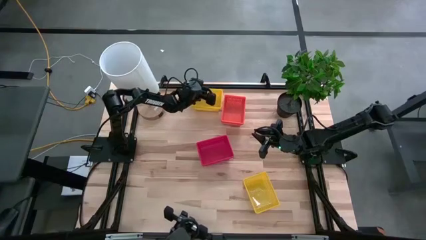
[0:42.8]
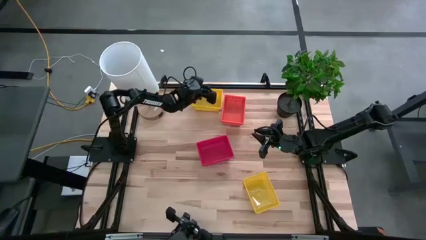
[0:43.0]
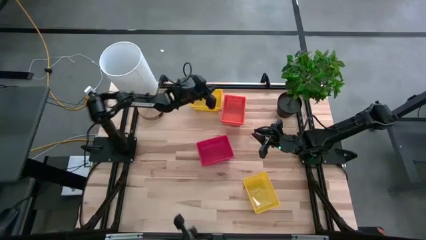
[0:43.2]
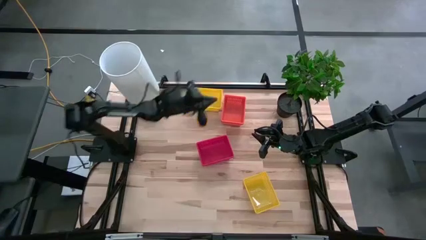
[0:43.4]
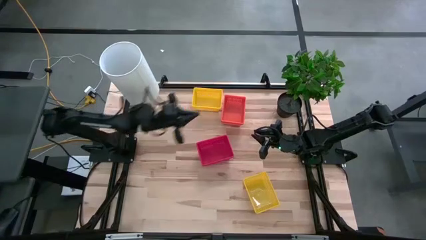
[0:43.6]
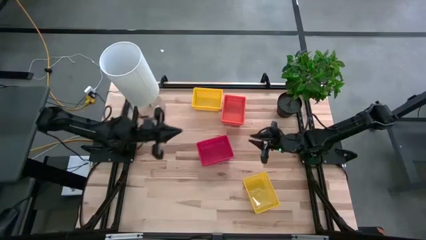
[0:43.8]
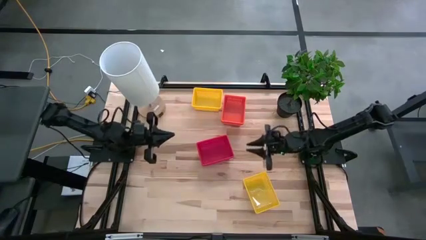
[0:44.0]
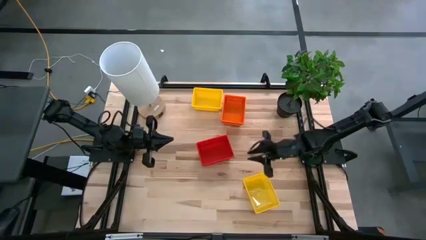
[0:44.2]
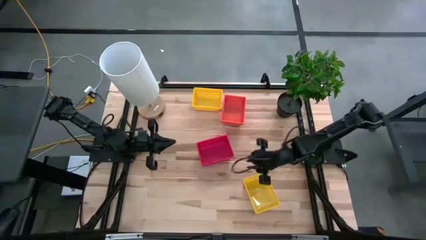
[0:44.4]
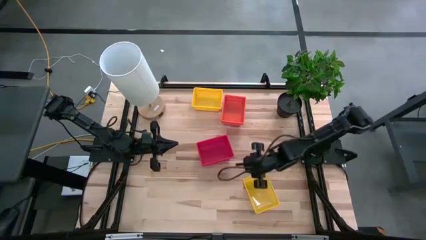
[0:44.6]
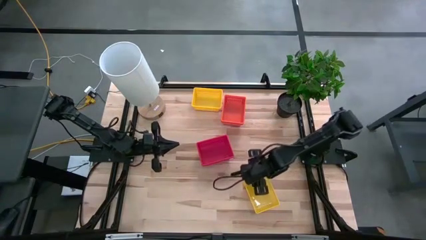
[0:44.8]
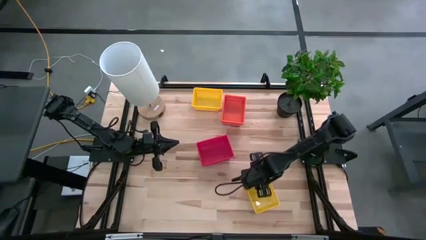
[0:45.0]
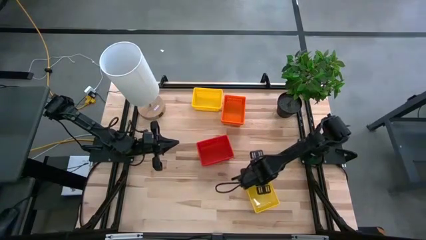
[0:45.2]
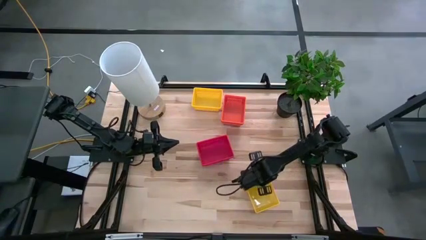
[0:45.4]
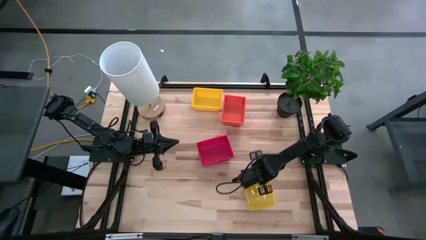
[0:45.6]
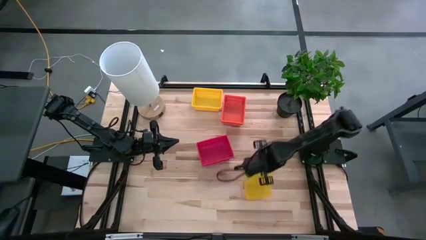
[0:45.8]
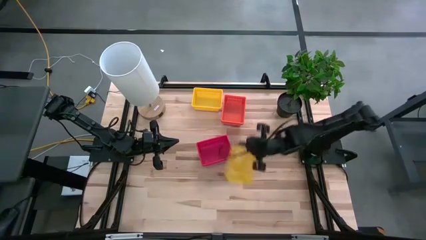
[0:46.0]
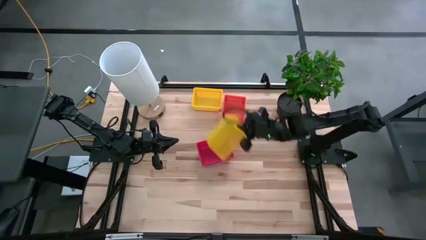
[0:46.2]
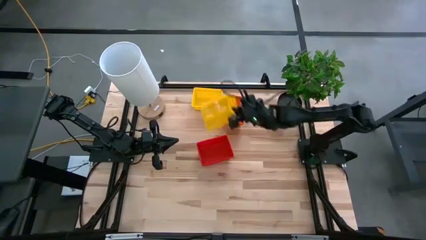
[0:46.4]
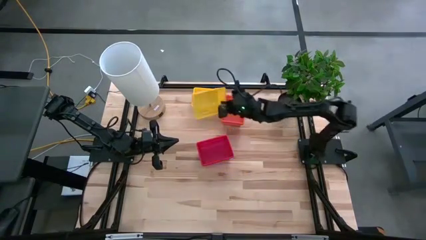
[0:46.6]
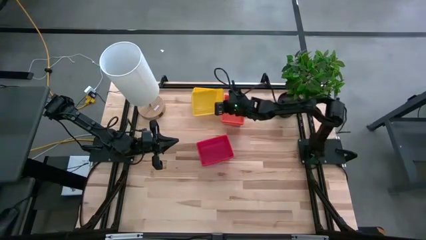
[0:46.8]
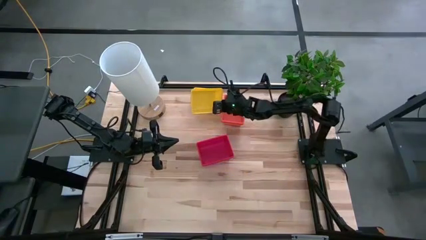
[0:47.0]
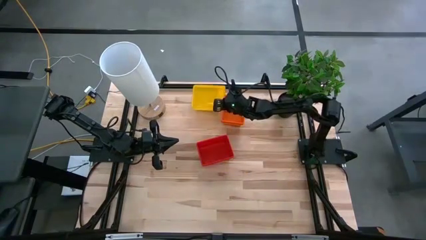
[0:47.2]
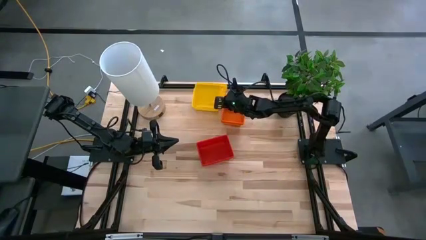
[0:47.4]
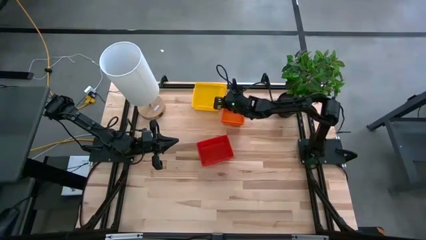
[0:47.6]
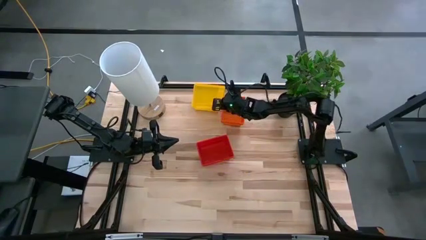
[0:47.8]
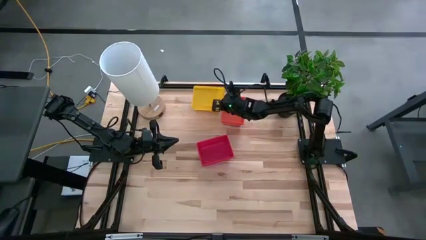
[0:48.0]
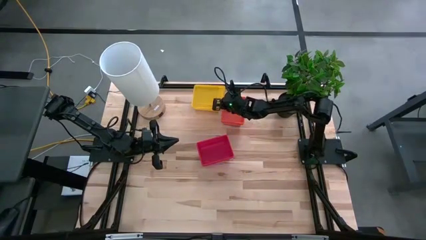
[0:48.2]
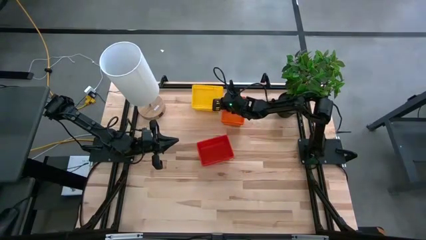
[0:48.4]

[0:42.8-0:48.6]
Stack the right yellow bin on the top yellow bin

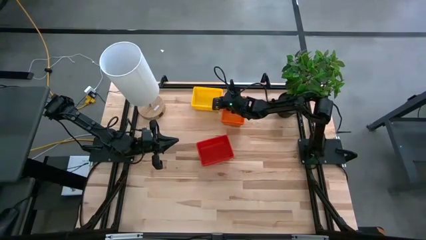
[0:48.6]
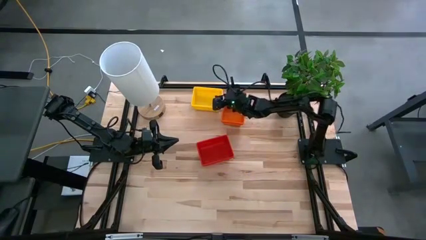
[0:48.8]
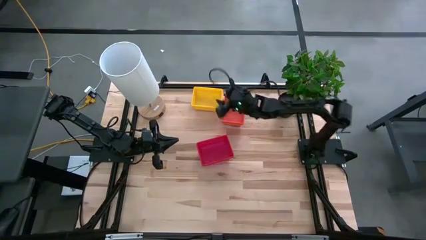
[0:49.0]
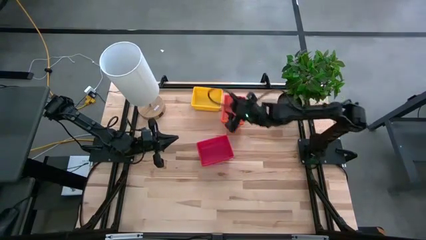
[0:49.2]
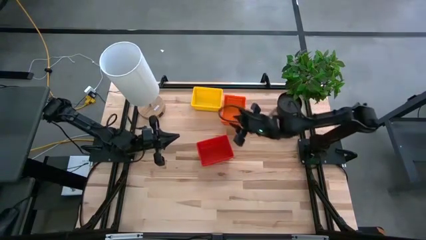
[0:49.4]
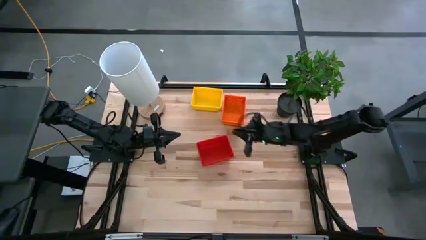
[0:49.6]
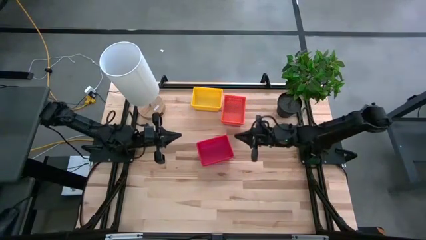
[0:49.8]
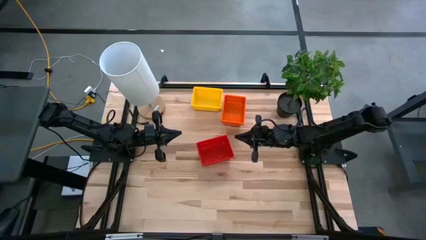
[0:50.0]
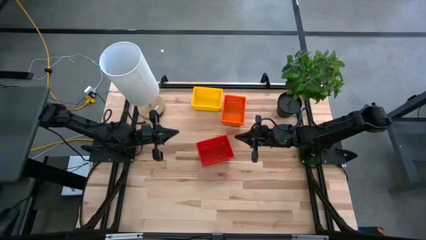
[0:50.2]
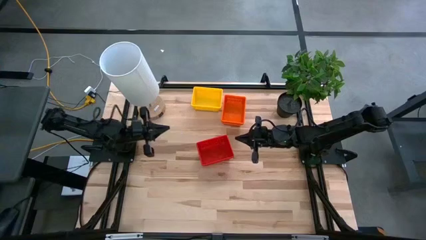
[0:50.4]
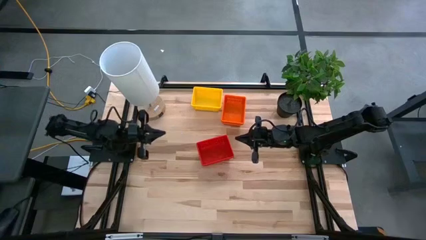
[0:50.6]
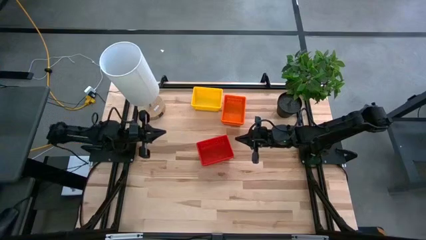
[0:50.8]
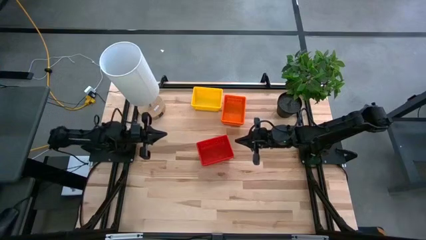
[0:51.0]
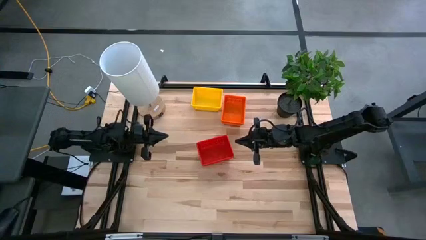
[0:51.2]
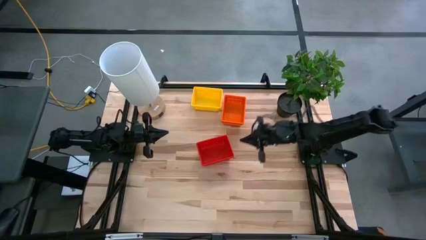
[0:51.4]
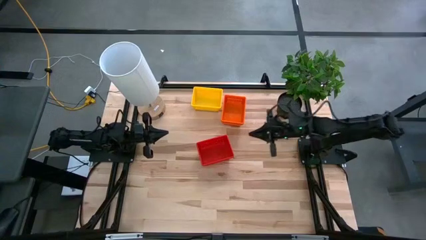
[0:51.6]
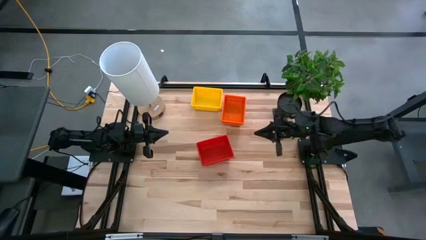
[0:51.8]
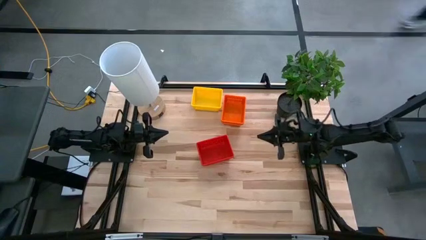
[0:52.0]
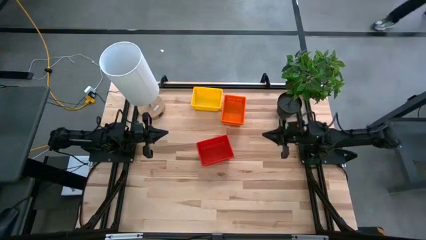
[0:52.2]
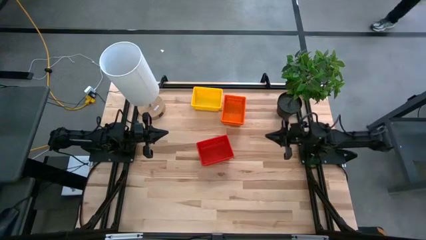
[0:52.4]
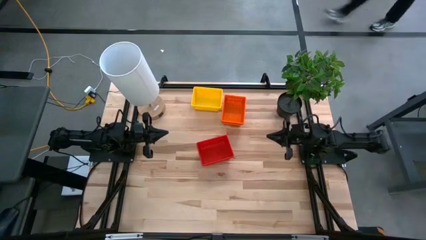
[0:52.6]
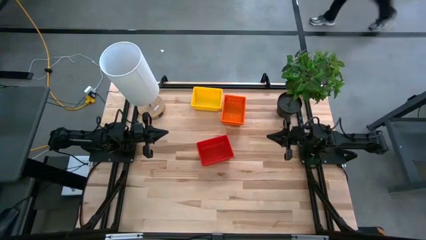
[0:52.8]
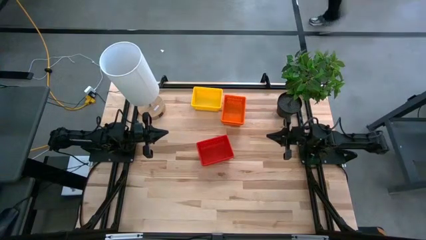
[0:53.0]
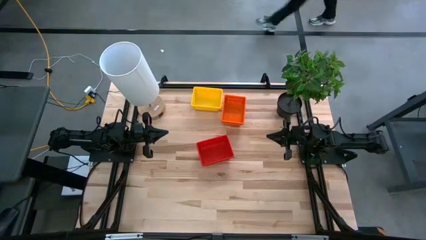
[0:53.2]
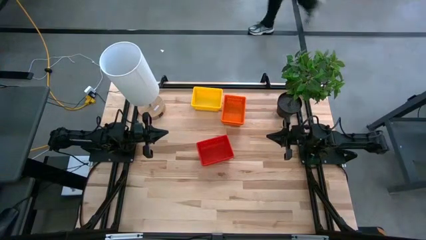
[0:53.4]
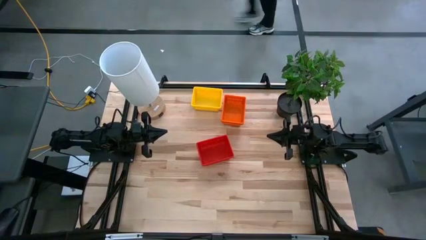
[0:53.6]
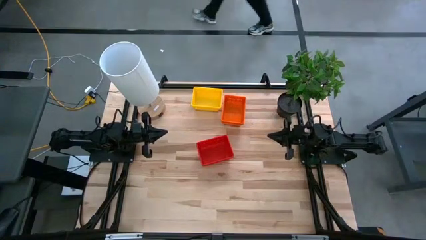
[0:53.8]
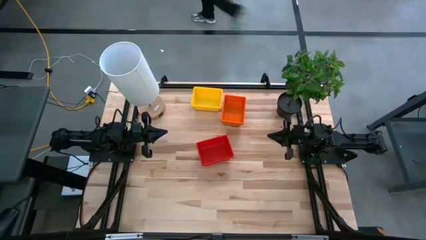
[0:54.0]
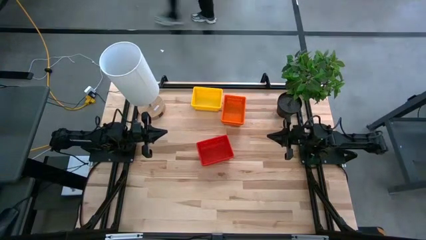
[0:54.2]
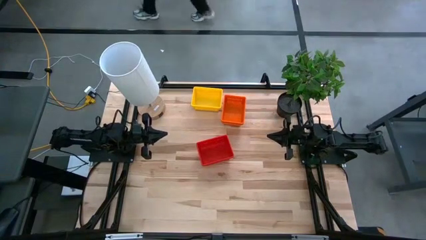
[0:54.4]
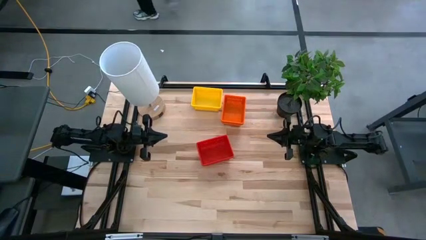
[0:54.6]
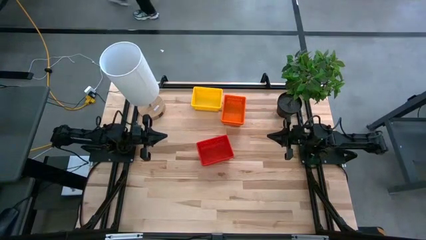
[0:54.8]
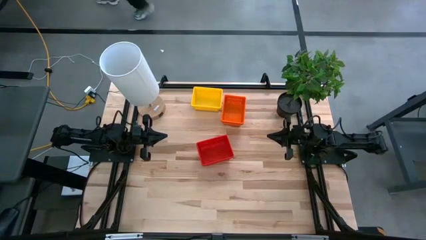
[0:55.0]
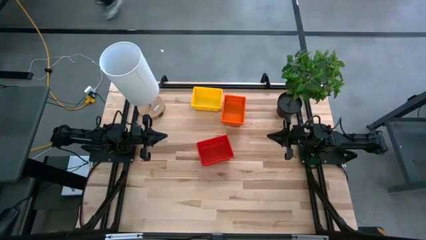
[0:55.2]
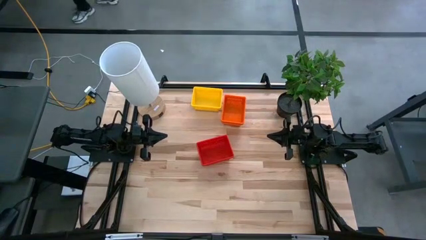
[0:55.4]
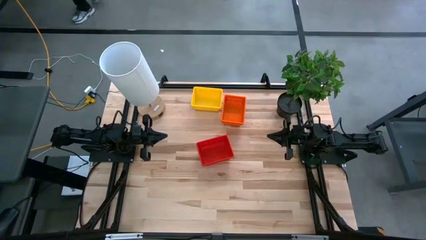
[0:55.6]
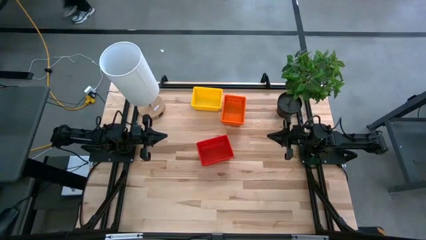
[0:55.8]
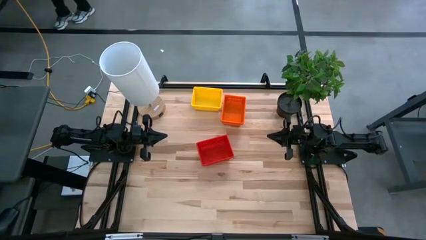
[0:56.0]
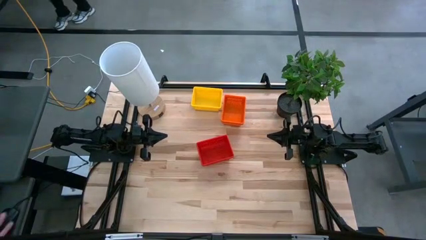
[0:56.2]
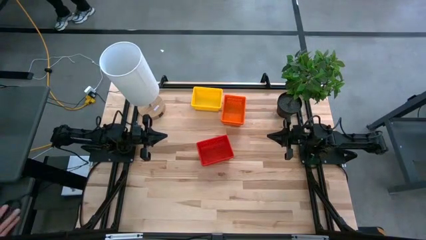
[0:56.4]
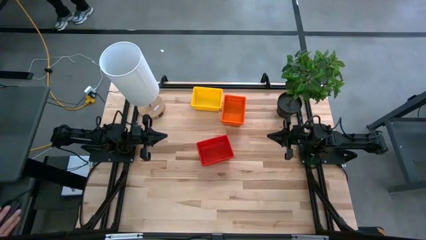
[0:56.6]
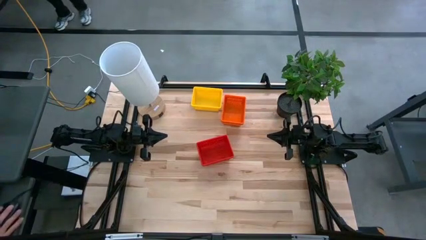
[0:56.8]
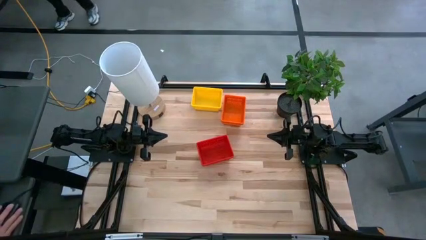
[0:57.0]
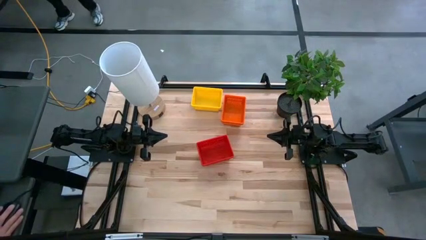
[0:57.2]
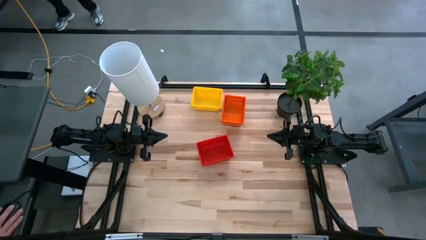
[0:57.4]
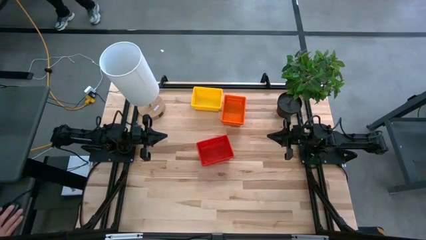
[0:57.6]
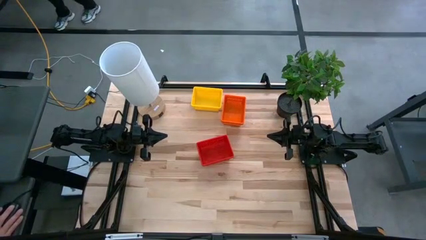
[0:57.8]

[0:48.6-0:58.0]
Return to Home Position
